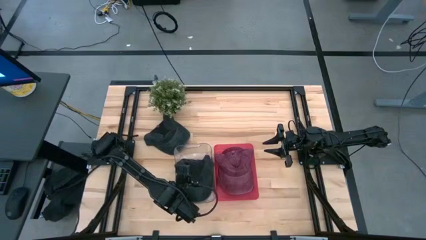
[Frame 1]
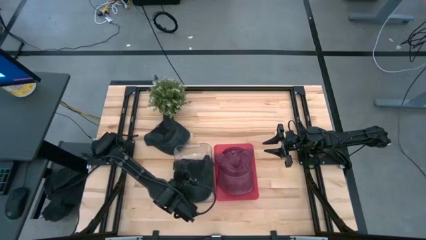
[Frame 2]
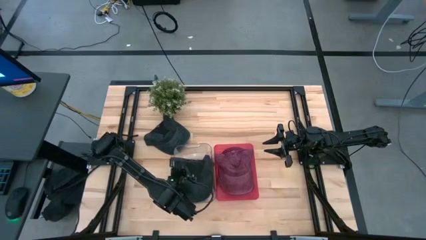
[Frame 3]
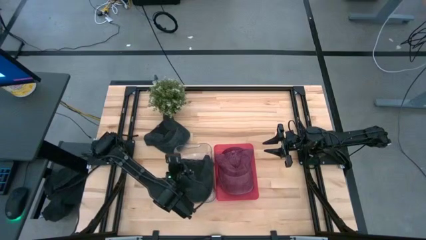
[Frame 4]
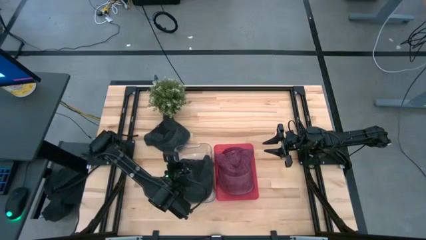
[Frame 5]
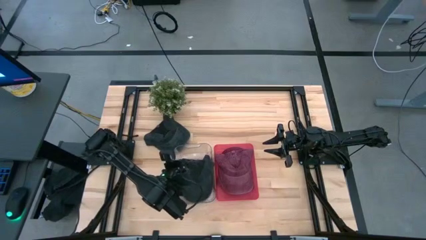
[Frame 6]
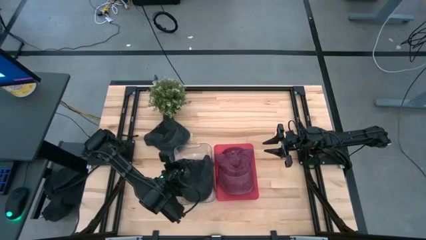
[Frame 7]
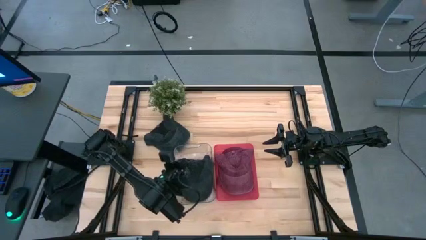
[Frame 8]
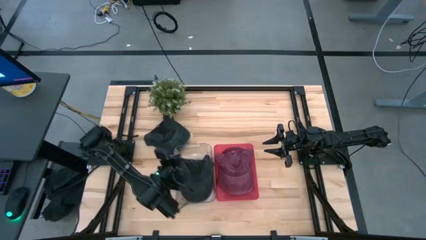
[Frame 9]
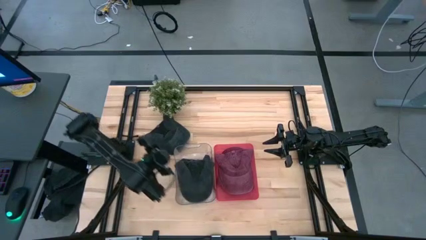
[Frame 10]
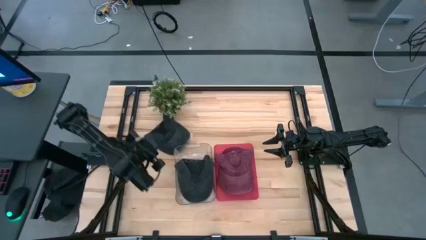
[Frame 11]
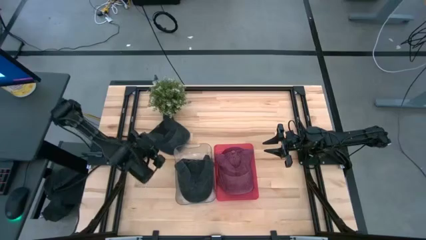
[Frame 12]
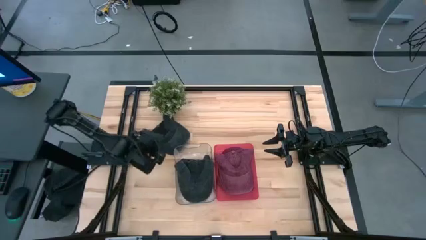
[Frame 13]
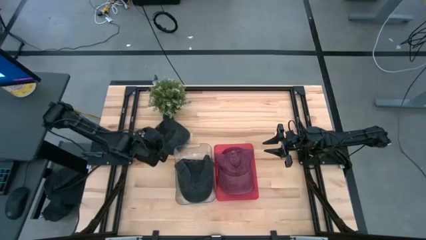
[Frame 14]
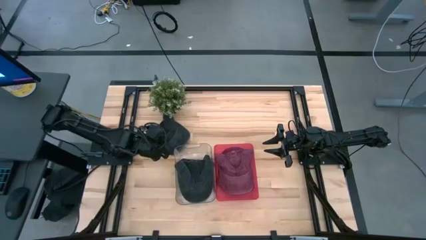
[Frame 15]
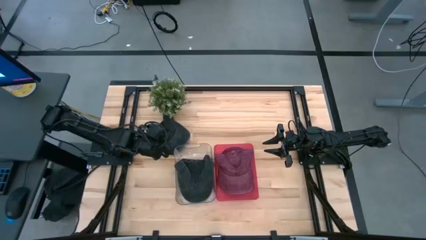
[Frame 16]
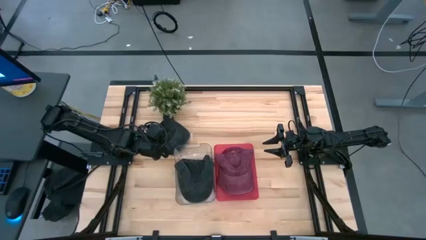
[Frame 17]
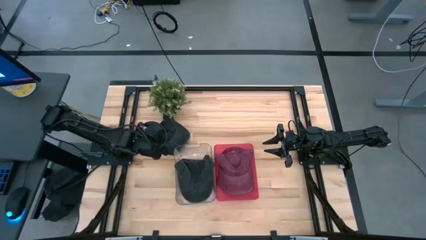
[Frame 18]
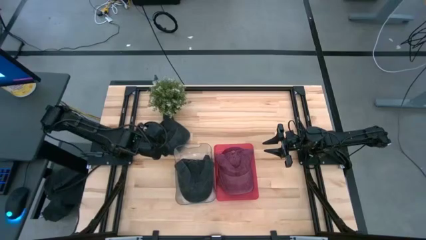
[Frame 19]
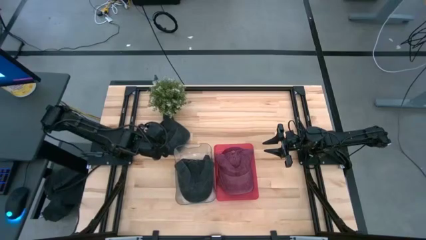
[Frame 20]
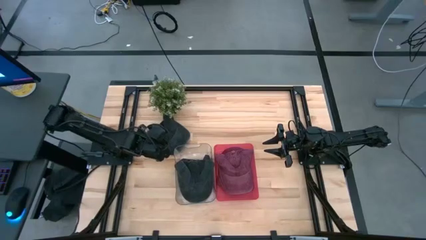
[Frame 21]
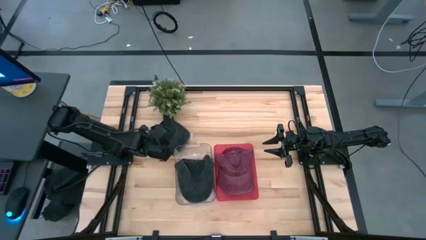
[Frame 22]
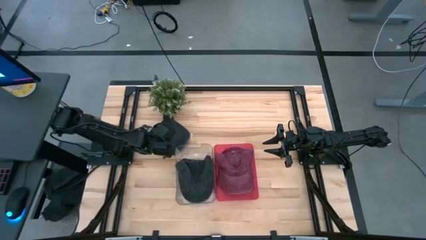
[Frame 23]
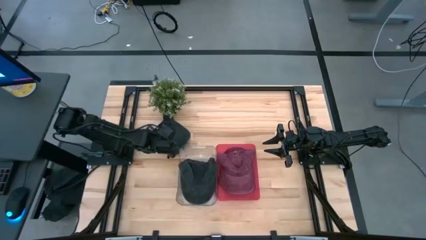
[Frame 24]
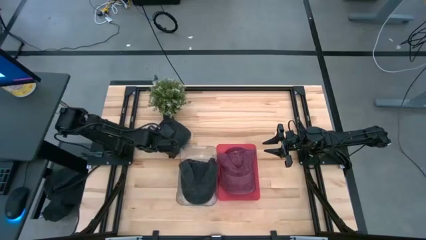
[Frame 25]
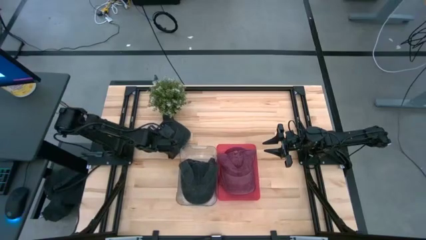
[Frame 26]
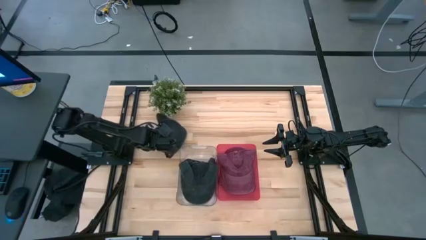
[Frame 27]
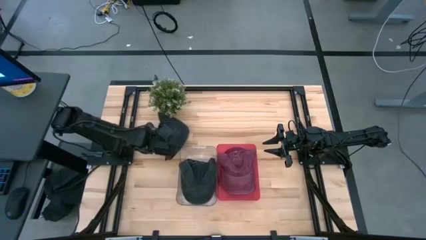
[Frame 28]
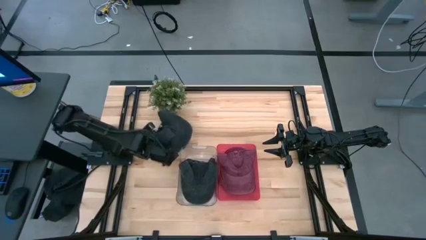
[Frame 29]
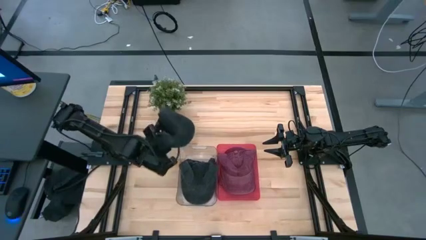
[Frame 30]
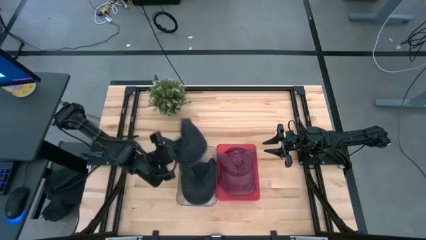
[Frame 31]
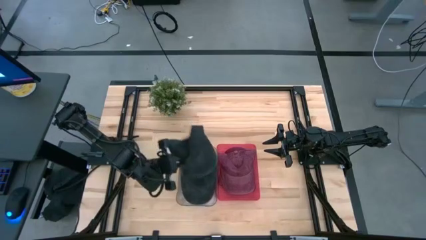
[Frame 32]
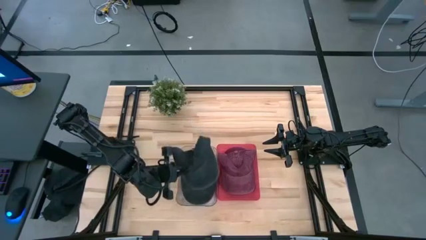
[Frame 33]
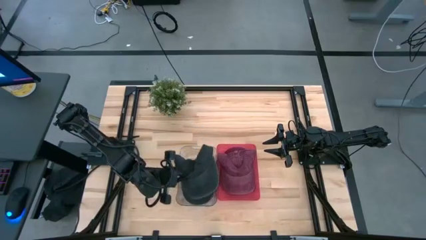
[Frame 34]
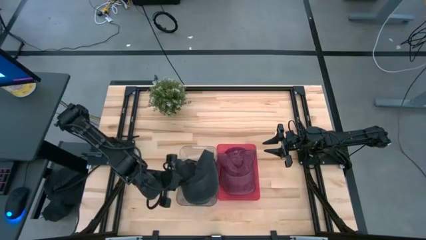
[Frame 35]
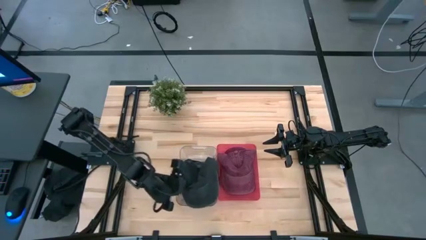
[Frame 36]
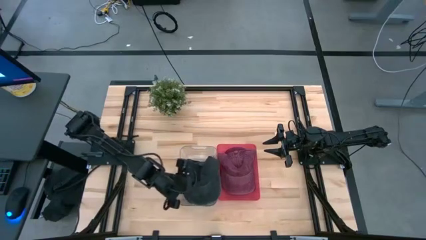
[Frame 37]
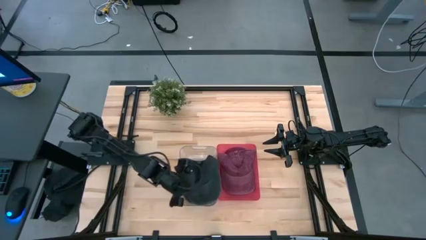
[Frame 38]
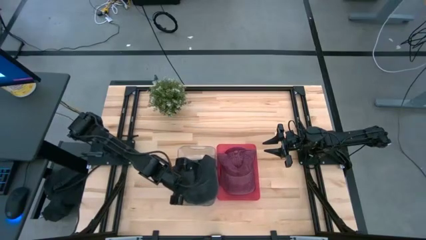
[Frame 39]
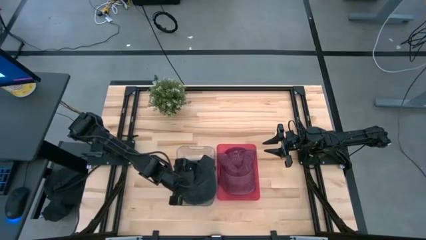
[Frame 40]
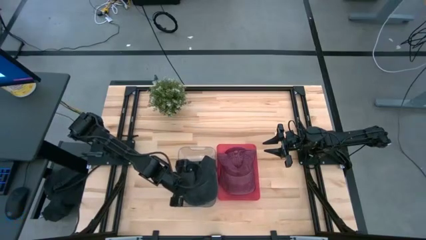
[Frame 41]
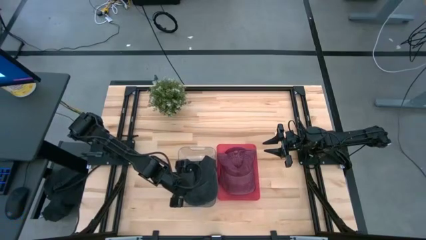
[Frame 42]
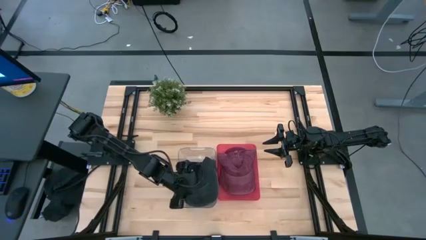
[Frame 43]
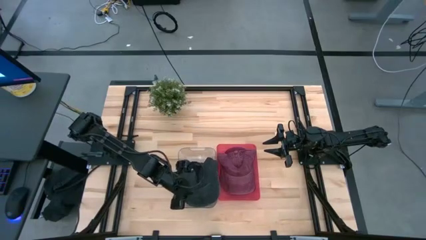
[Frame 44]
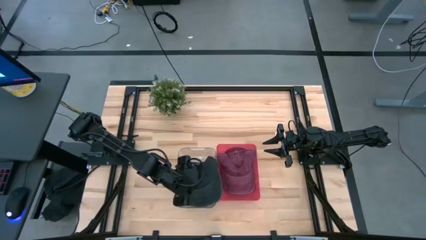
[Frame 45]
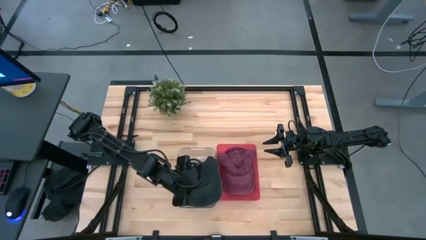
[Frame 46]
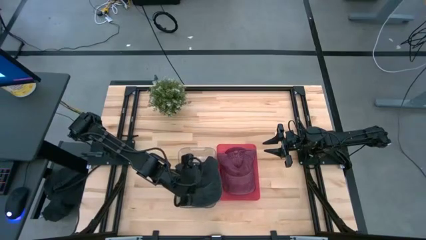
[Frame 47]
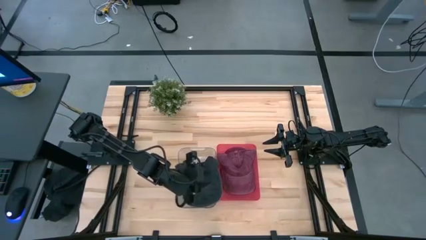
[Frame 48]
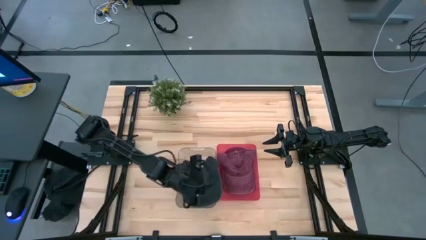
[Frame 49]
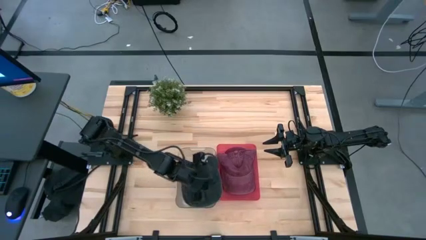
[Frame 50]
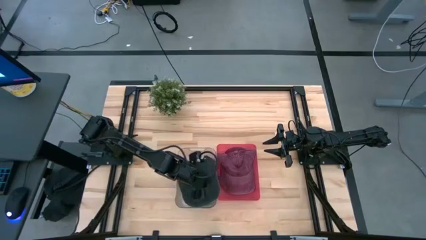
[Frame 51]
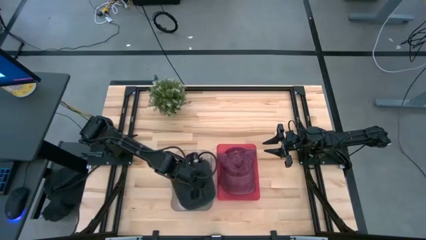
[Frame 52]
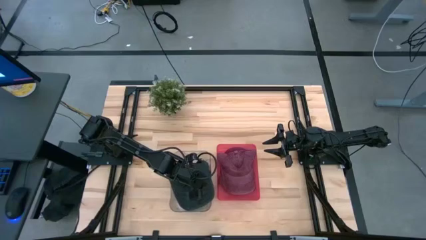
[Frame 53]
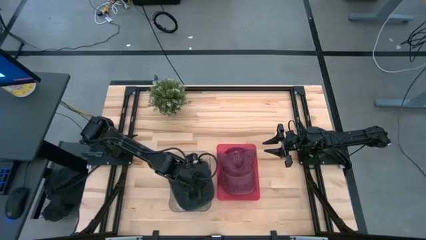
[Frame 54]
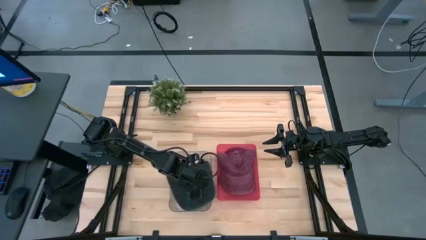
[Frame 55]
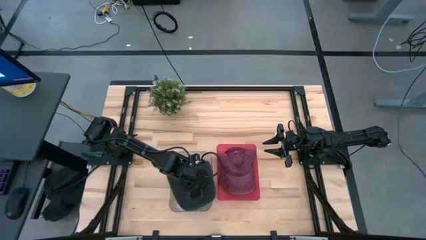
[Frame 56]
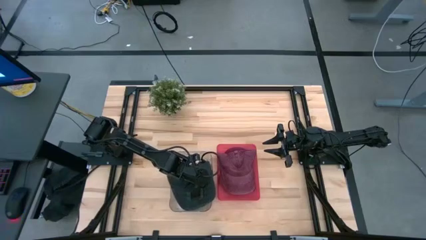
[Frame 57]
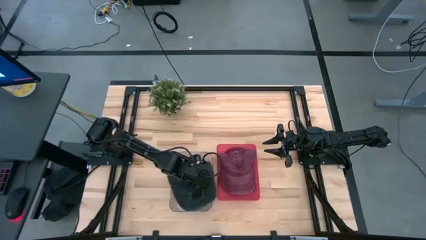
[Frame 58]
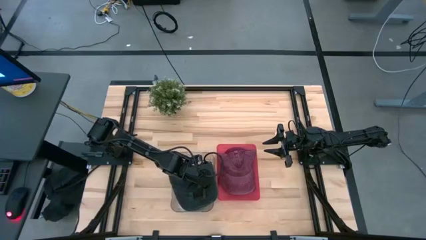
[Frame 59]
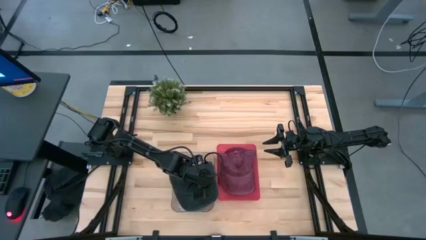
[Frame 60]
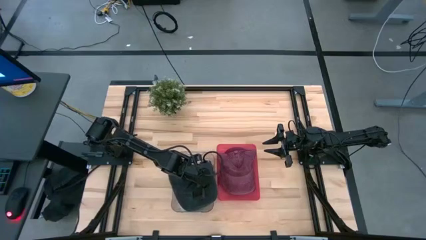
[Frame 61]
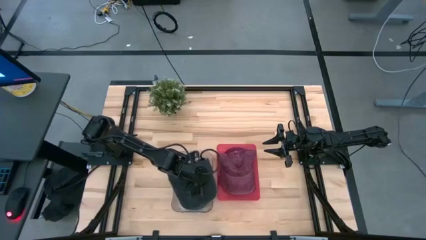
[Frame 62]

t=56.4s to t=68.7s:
Task: Pick & Place hat
Put the black cap into the transparent bin
